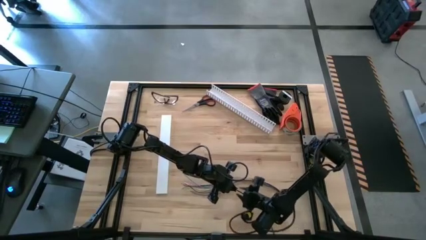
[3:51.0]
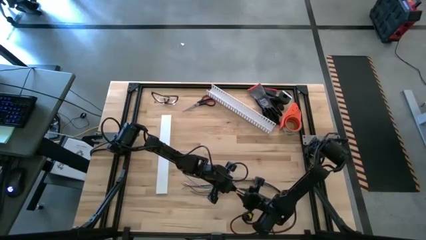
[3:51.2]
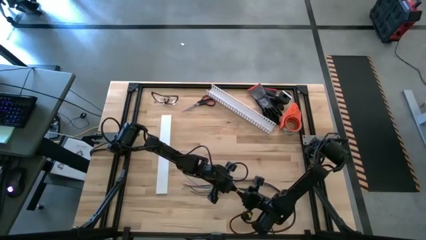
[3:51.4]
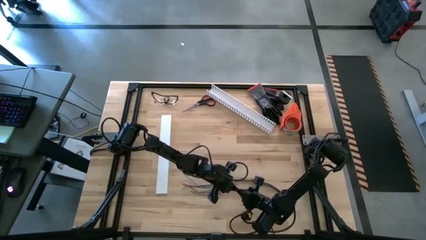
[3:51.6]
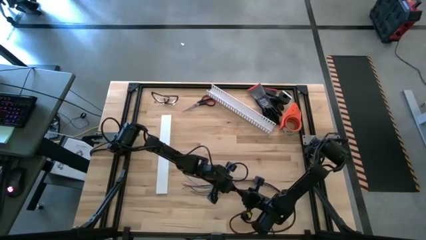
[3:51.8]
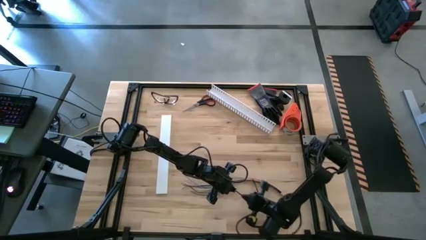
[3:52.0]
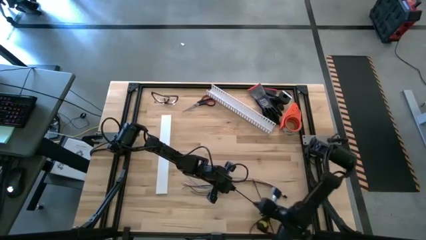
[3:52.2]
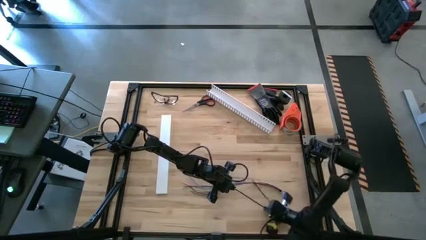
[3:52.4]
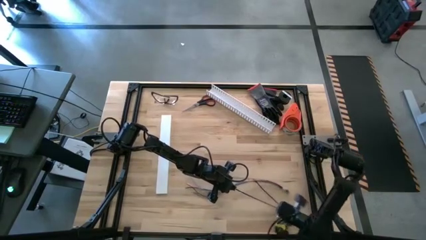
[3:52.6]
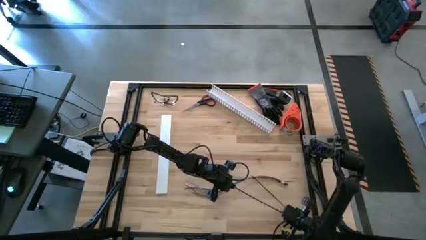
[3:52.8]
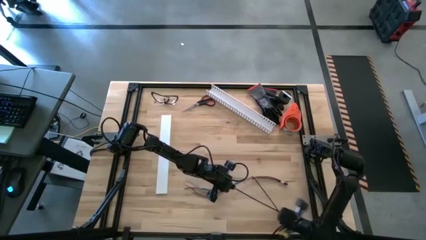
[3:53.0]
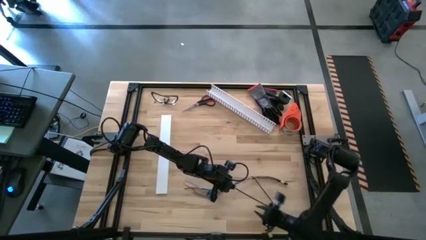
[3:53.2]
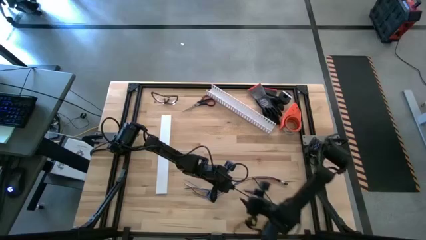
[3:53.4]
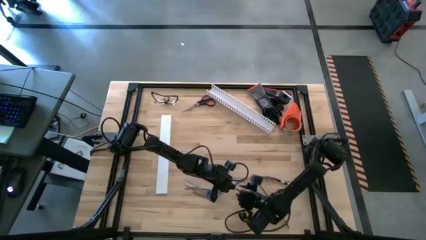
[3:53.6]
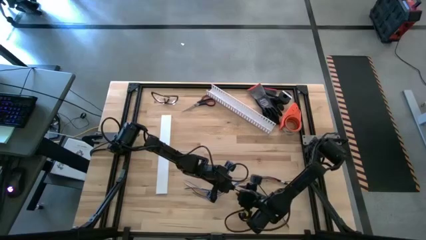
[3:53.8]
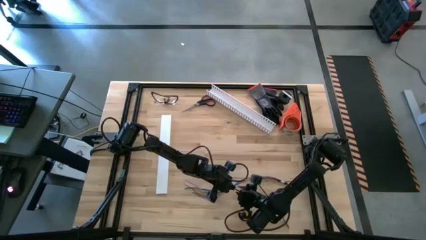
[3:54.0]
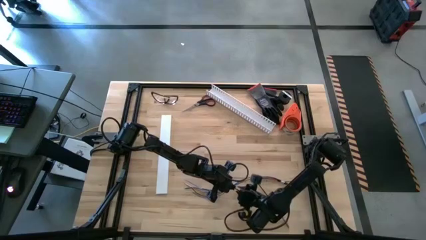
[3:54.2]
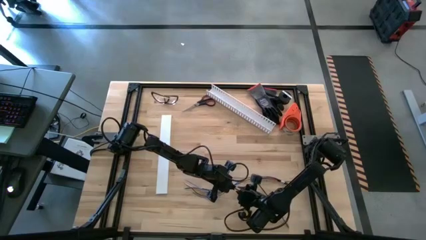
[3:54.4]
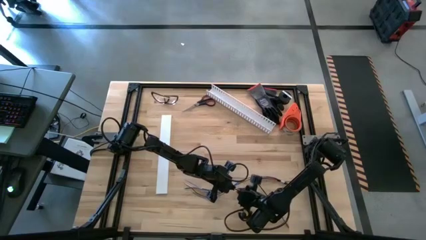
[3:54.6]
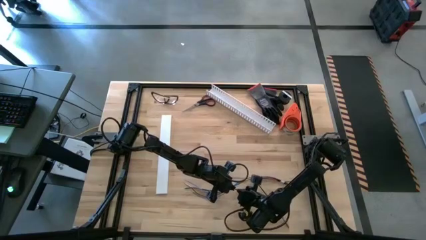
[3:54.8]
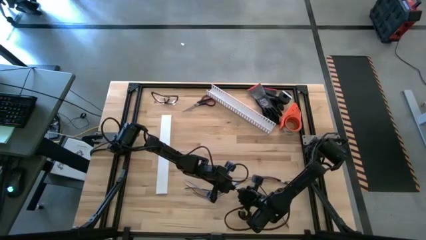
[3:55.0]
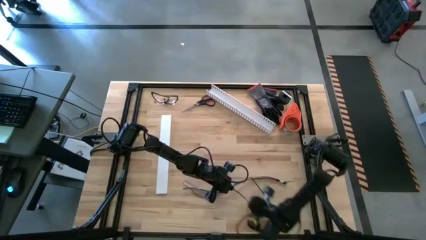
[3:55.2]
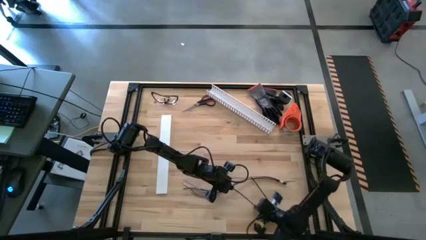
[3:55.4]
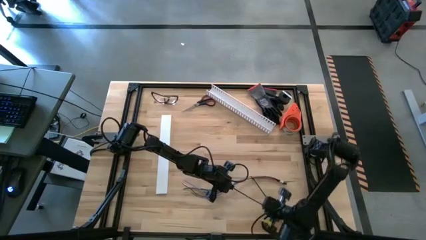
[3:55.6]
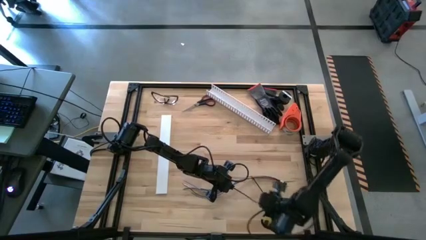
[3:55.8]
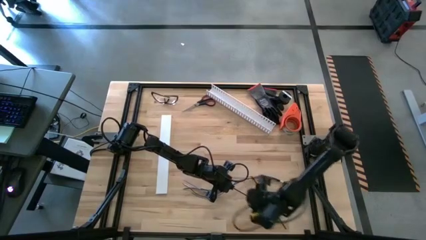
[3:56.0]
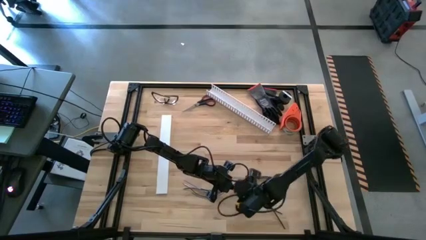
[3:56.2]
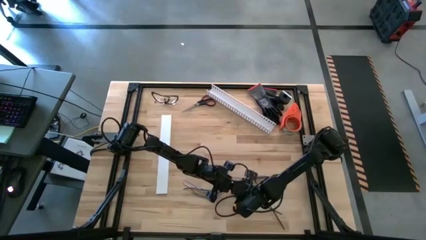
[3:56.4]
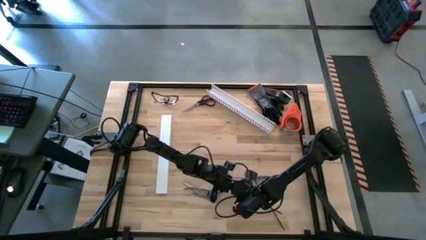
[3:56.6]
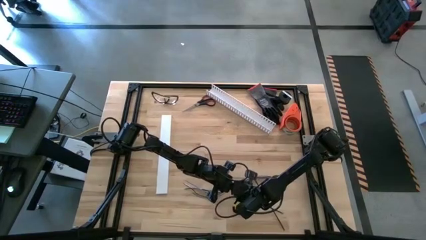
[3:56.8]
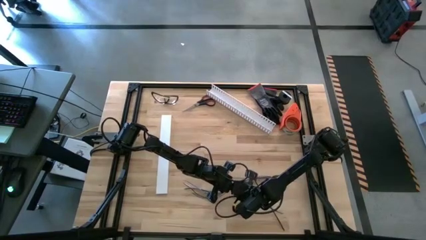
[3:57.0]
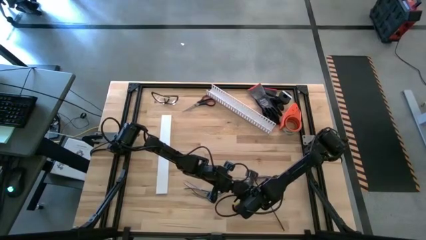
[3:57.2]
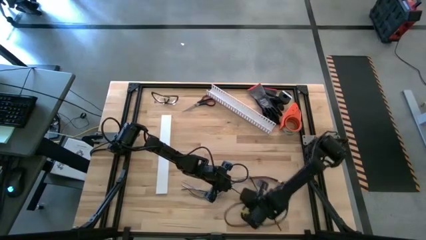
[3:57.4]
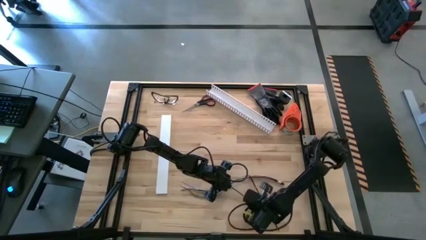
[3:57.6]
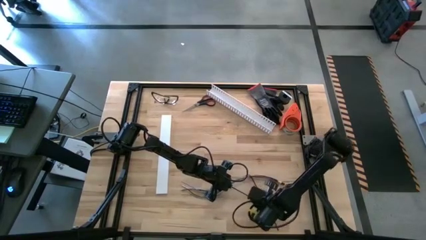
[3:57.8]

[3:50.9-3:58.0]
Task: Ziptie cables
Wrap the black zip tie on the cable wires

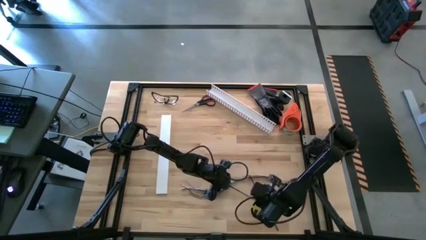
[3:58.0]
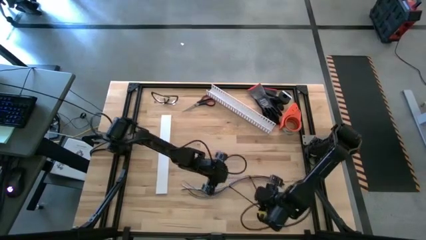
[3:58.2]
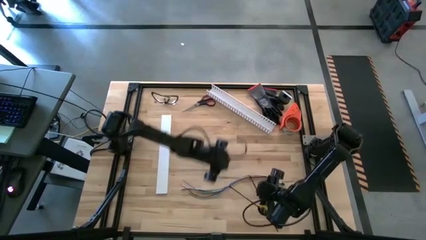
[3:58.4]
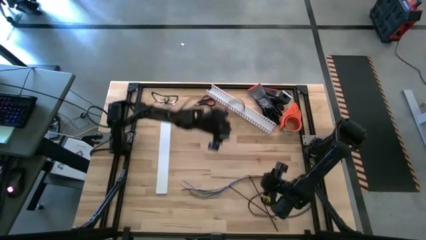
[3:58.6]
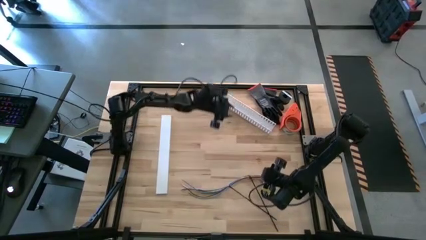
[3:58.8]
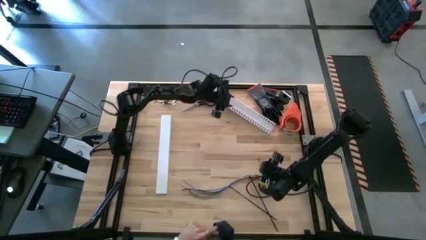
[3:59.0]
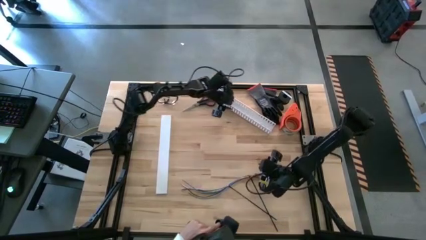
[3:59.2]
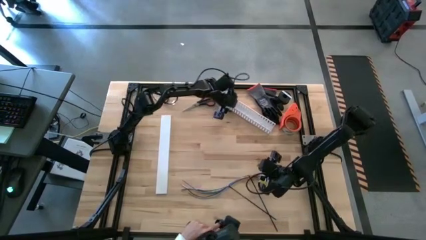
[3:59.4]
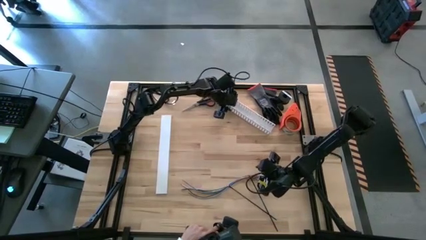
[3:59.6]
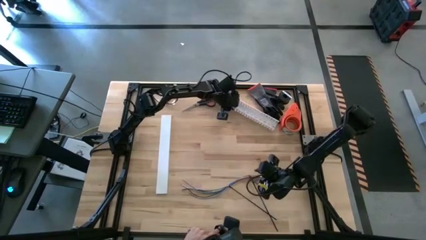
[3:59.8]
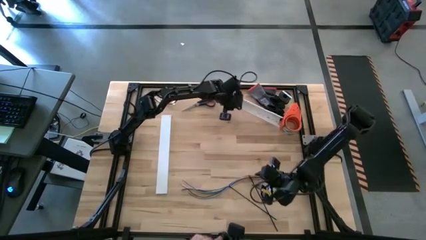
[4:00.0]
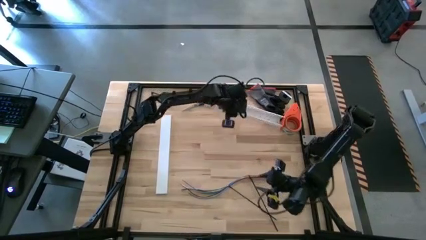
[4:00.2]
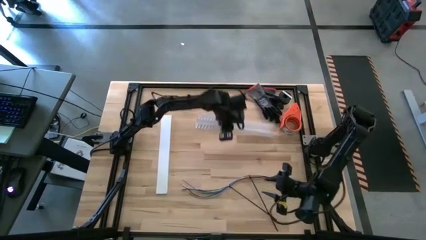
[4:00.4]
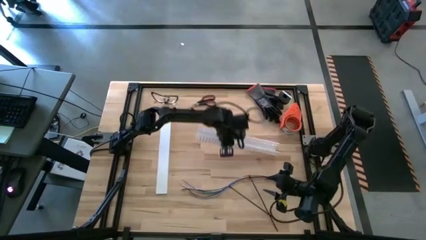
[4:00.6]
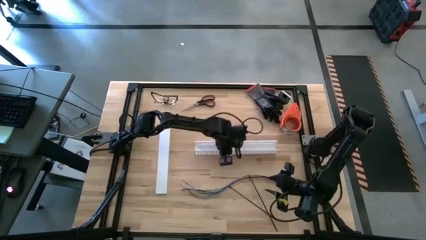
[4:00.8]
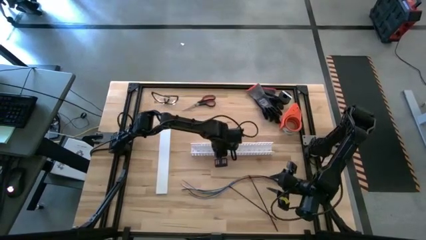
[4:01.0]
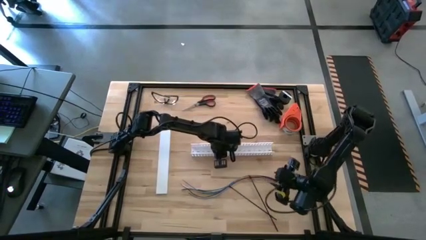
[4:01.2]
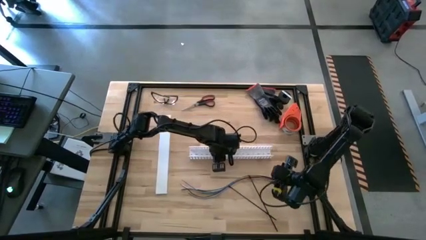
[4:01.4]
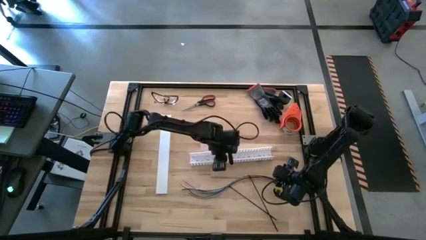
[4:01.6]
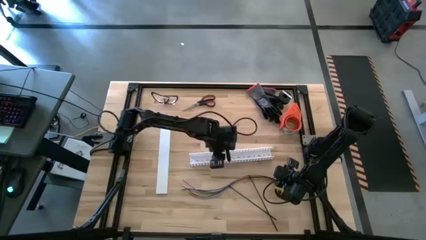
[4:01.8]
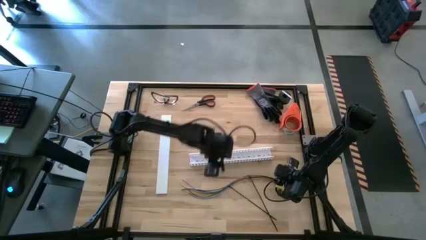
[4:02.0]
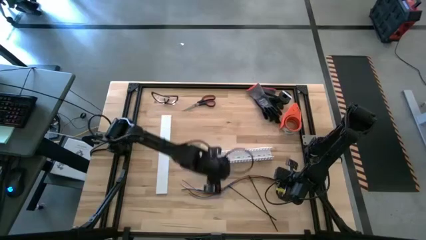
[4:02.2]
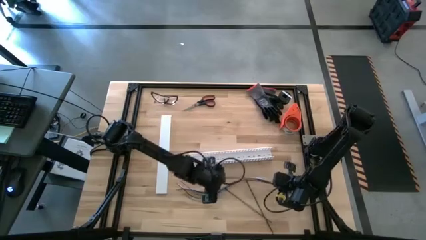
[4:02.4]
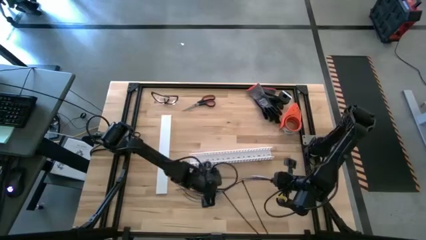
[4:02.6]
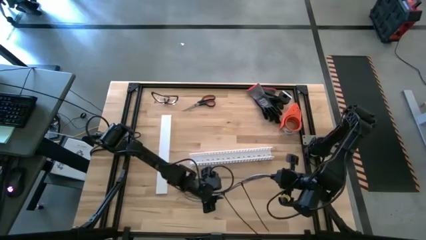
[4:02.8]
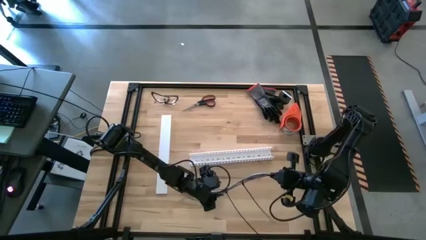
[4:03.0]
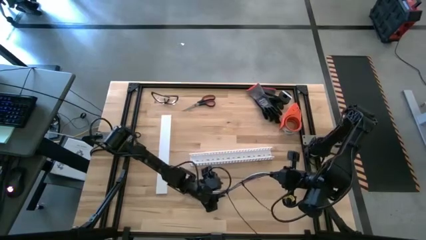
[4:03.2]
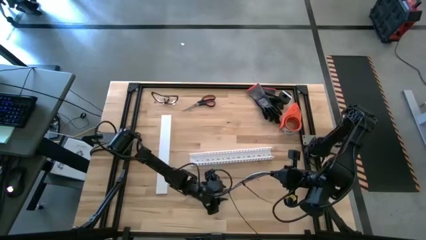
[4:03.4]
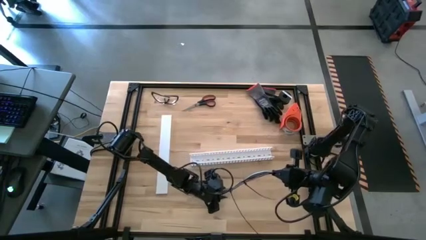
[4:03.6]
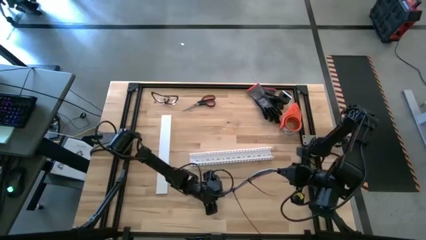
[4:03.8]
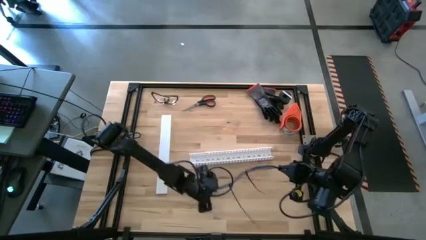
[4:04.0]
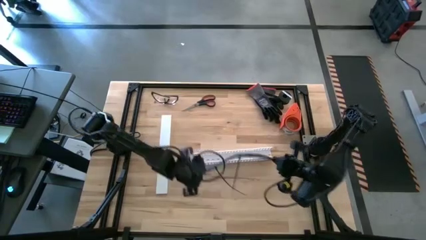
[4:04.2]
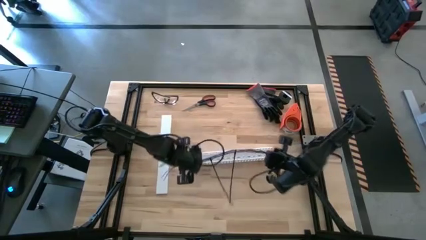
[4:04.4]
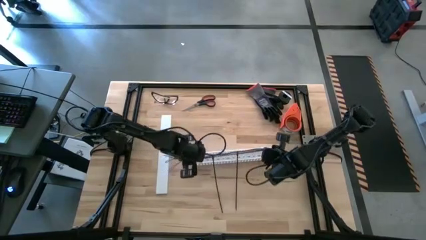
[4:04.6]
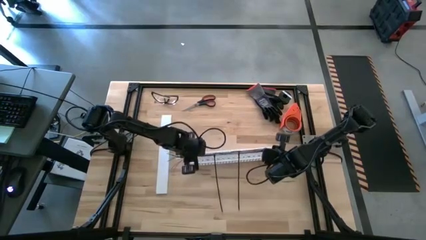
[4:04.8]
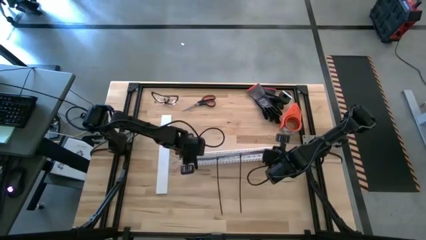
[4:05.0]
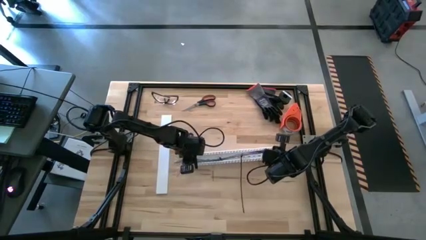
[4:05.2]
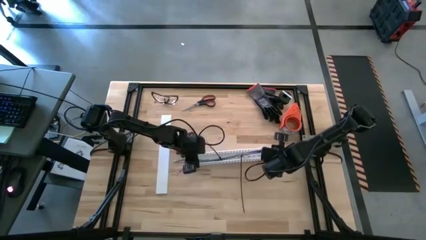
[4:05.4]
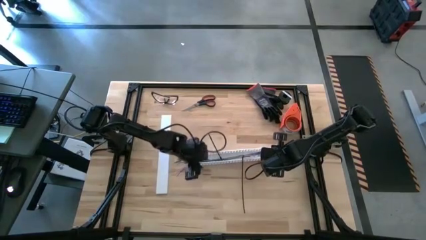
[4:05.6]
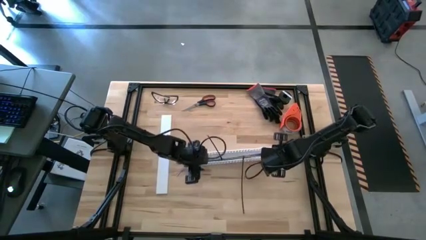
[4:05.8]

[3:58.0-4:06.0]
Put the zip tied cable wires into the white cable duct
